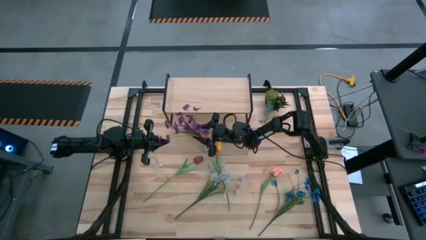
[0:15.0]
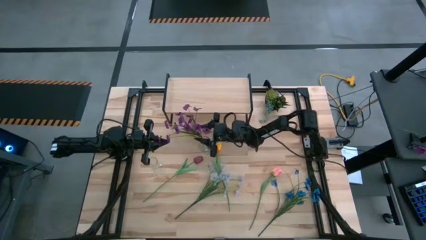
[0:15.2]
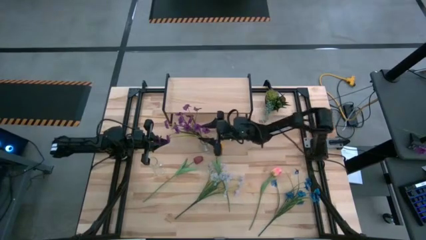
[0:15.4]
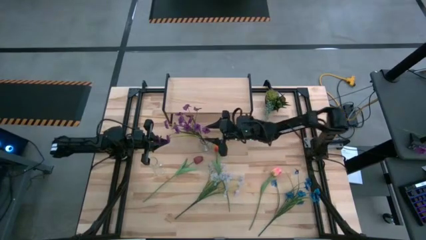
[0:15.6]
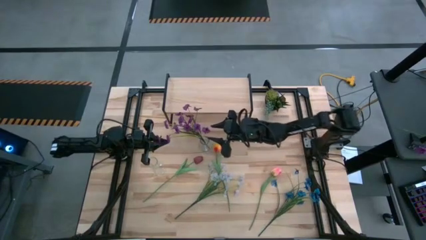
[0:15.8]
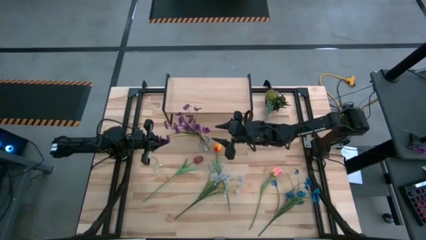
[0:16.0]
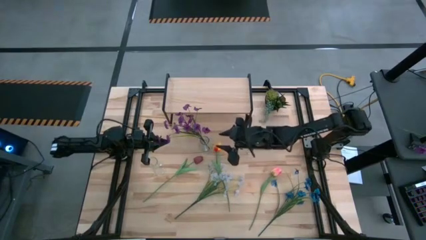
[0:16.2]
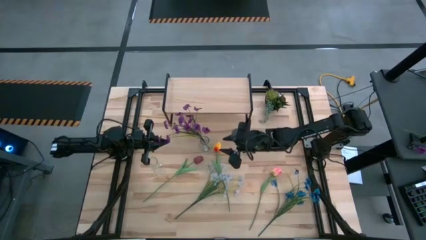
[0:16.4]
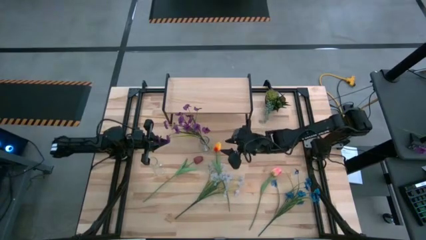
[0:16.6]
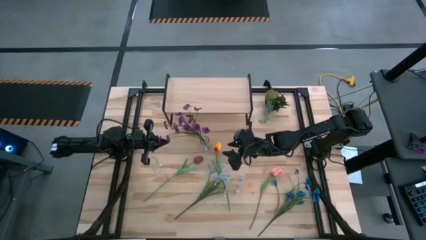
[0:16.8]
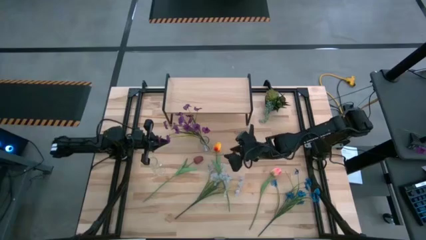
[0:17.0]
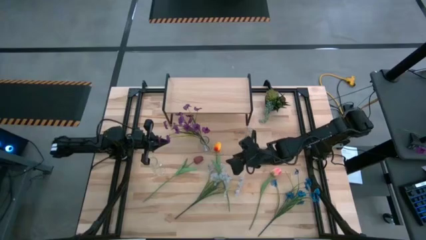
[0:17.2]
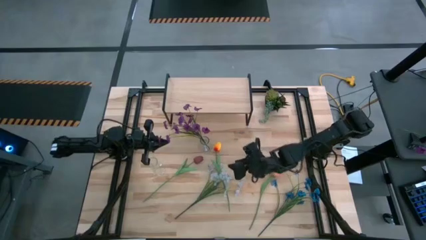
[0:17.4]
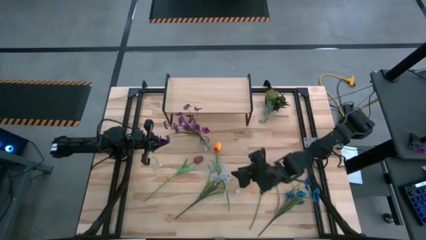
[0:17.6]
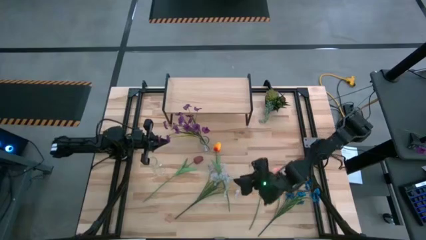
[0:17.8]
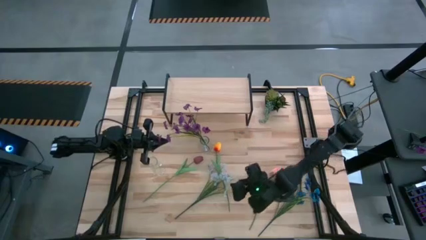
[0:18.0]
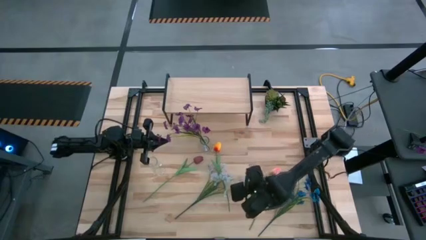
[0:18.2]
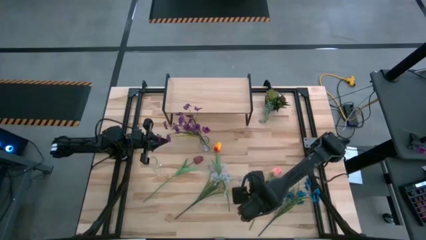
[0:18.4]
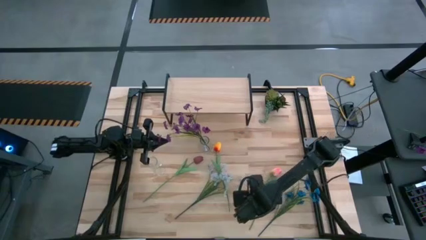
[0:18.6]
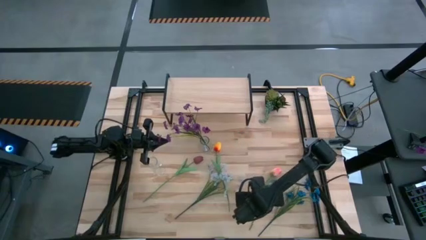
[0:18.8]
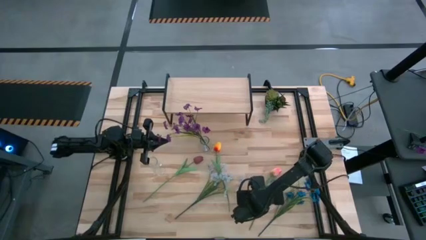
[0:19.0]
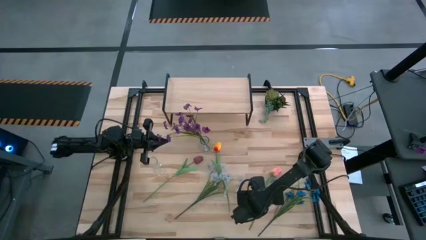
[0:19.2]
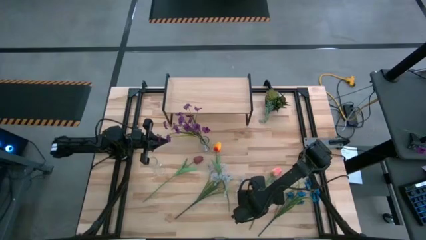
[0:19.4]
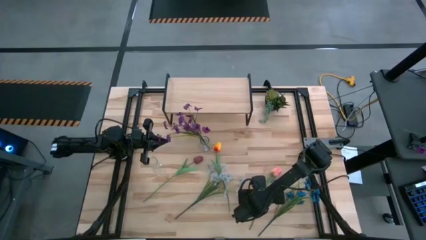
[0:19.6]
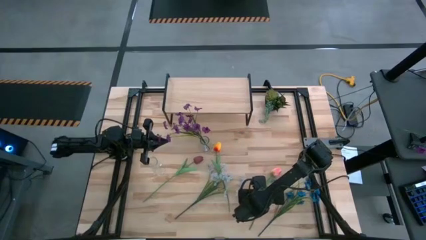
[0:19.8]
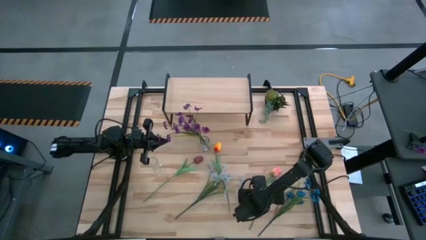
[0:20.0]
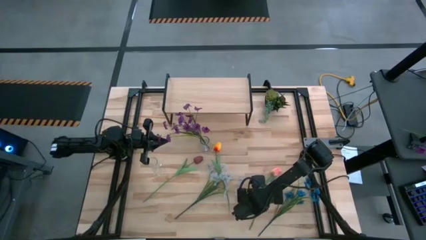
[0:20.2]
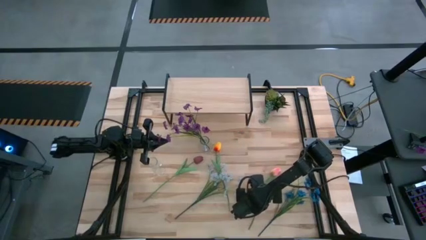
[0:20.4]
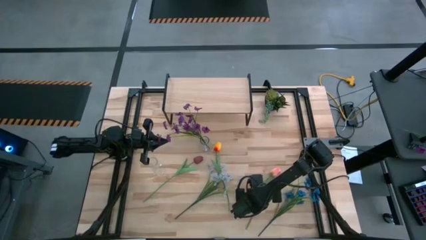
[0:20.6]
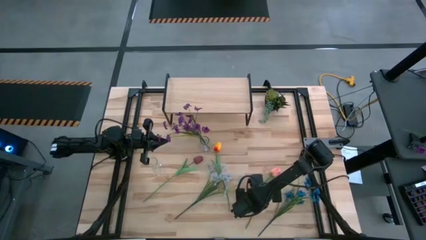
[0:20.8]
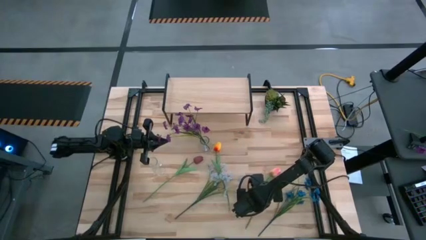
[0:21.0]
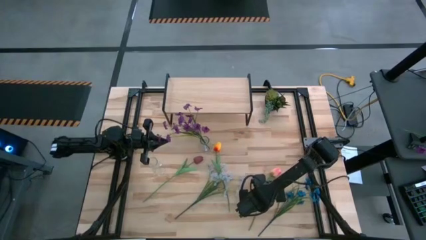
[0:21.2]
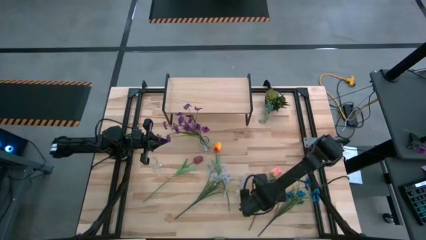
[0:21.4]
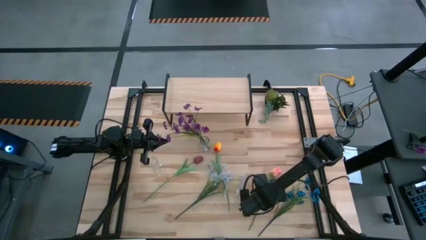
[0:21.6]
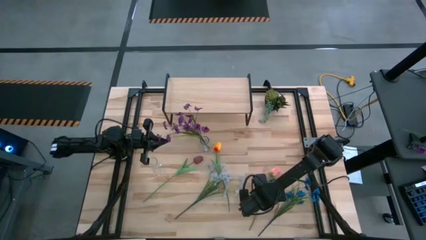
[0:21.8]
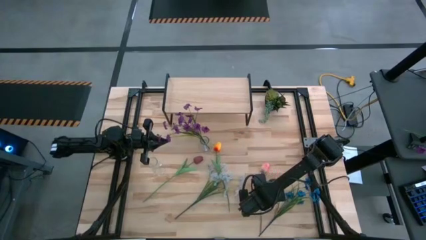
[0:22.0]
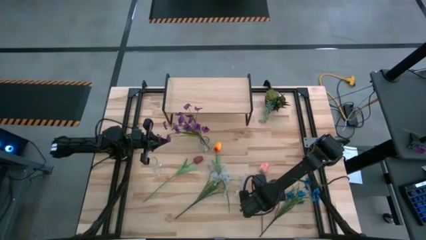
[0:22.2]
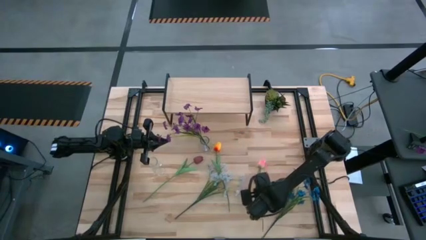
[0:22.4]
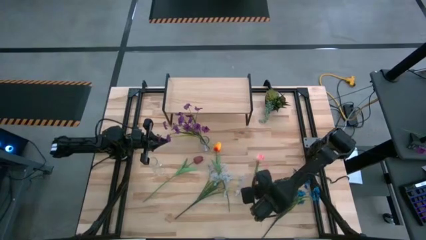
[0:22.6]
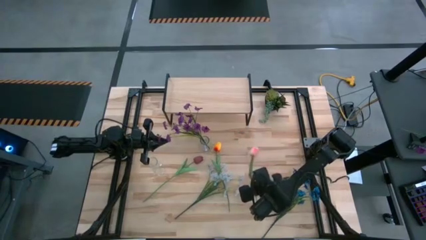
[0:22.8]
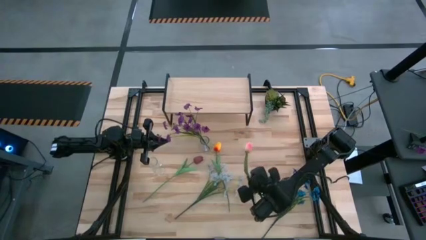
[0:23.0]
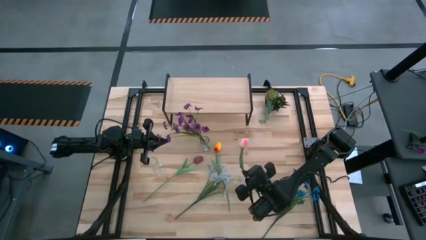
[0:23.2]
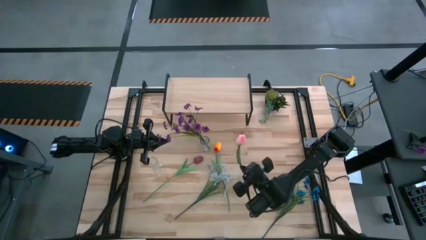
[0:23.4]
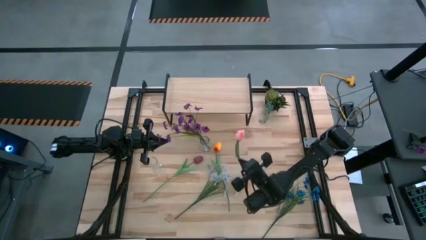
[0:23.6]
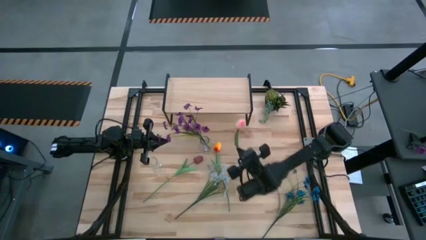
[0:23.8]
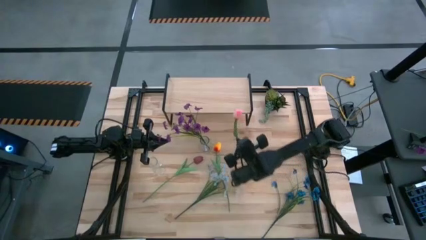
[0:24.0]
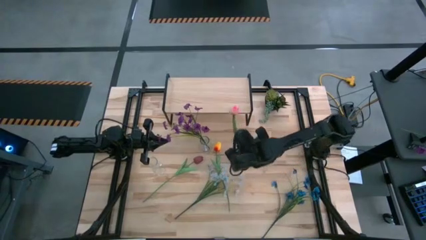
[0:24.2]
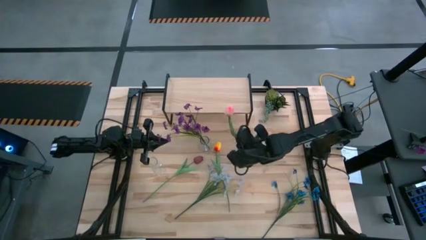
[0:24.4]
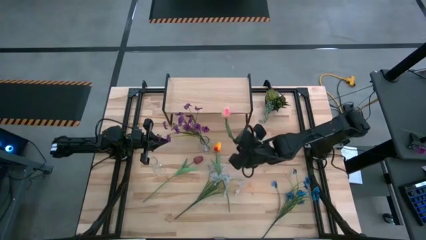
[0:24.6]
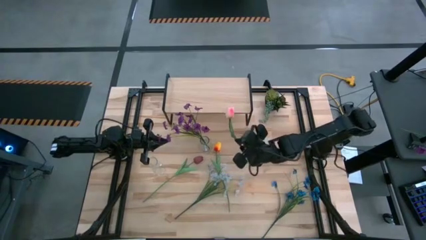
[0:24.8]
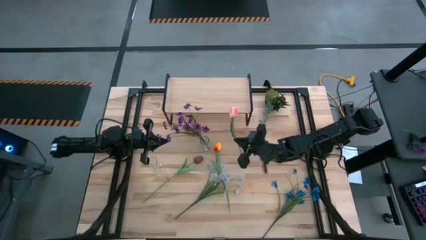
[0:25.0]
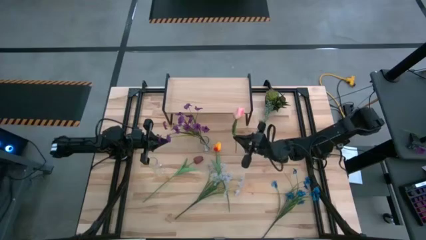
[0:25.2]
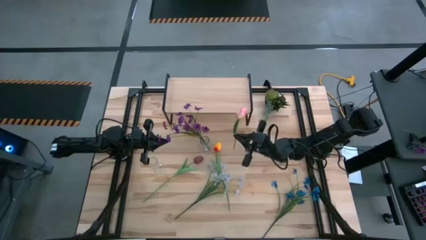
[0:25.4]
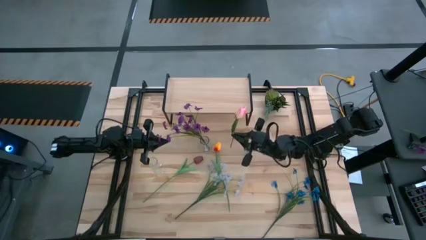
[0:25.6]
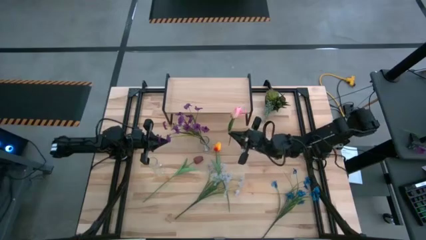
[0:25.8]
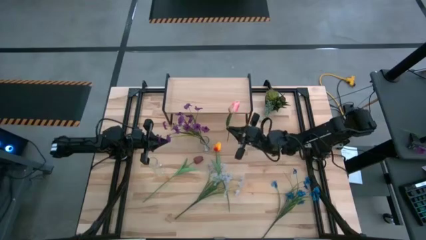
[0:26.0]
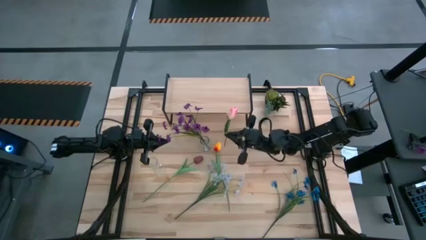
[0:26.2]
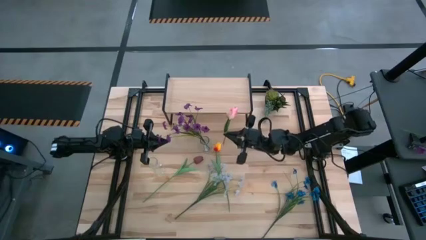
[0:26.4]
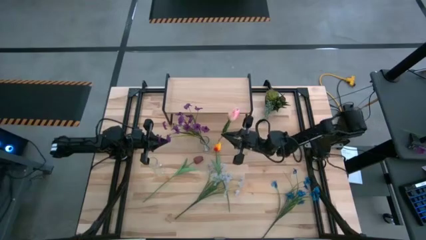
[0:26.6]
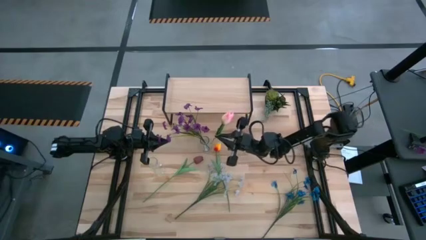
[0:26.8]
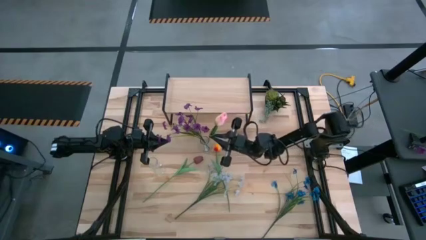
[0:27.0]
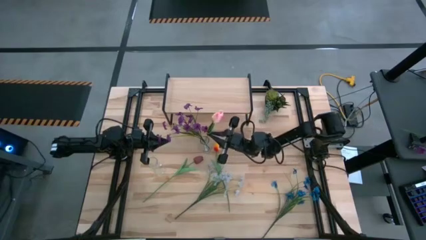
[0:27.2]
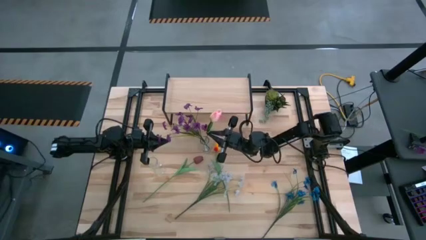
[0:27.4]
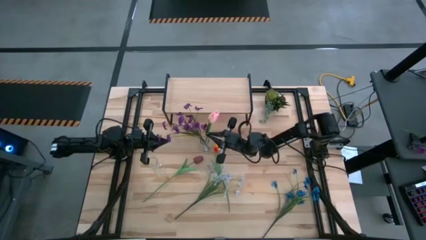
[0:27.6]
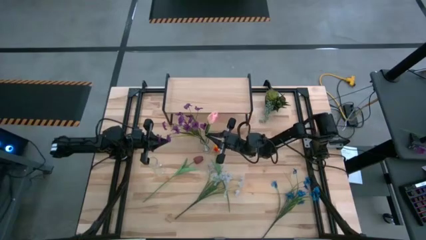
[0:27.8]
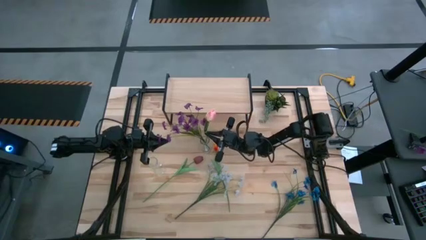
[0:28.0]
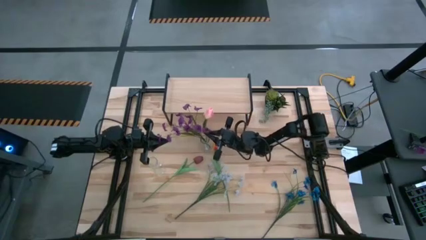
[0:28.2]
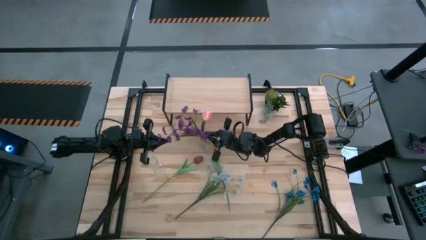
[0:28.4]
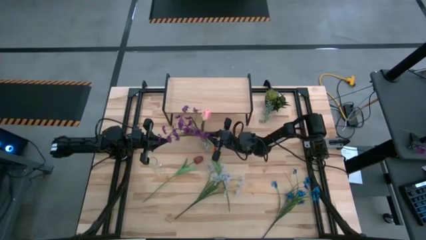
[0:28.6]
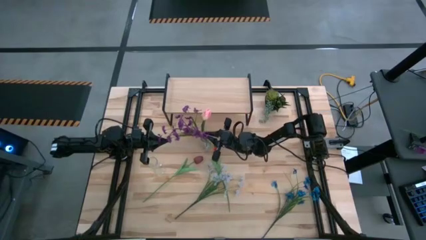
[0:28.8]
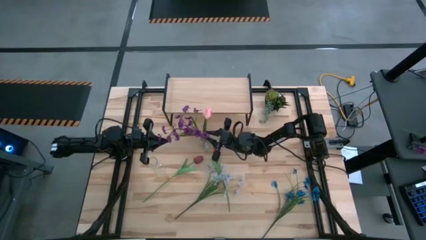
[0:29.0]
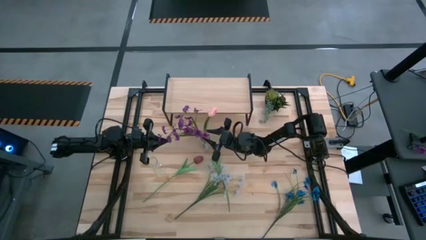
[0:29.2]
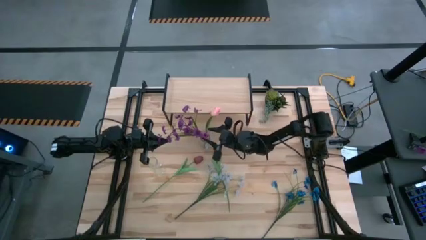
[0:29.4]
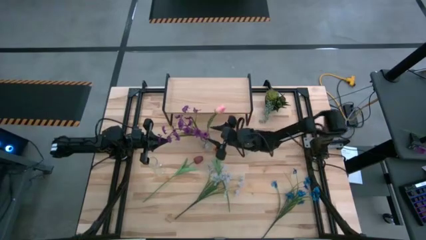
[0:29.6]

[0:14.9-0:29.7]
Task: Pick and place flowers into a vace then onto a shelf
Put the pink flower into the right transparent vase
